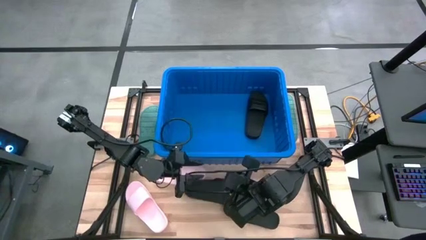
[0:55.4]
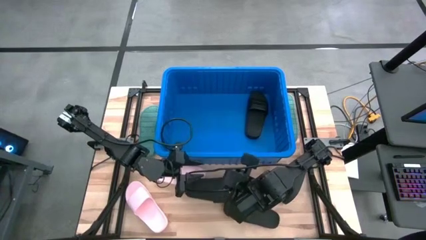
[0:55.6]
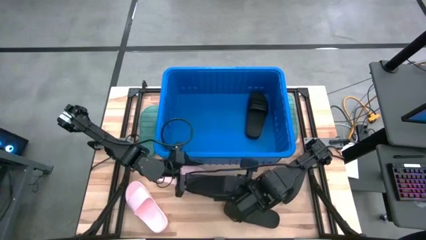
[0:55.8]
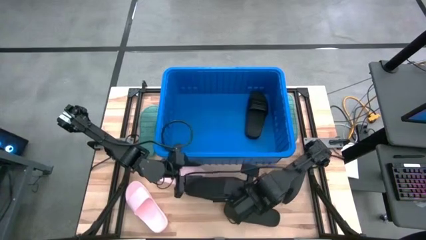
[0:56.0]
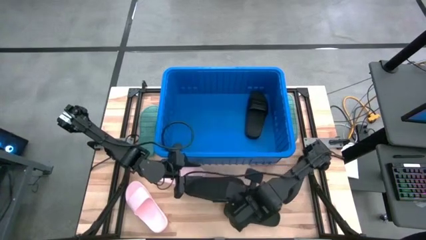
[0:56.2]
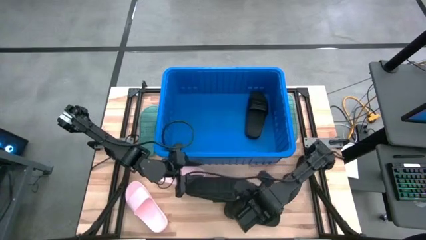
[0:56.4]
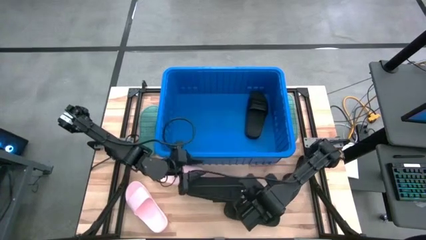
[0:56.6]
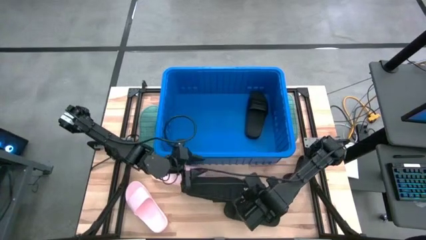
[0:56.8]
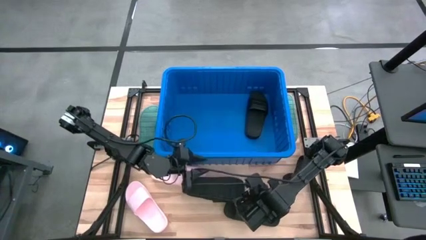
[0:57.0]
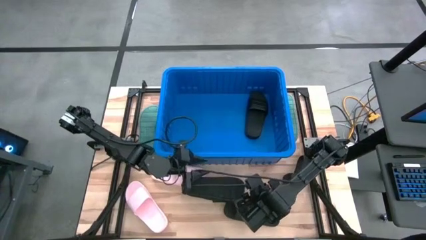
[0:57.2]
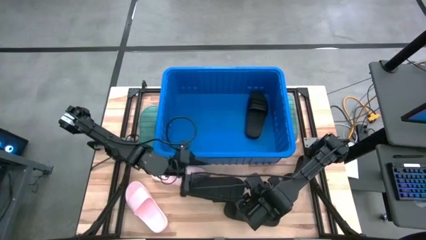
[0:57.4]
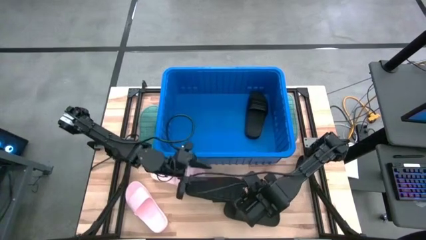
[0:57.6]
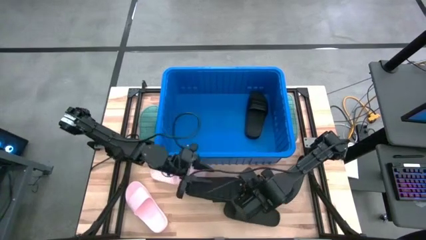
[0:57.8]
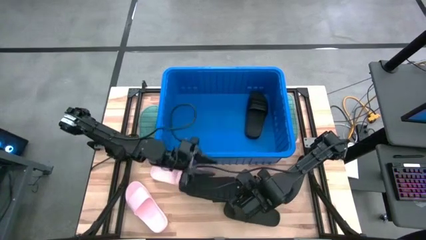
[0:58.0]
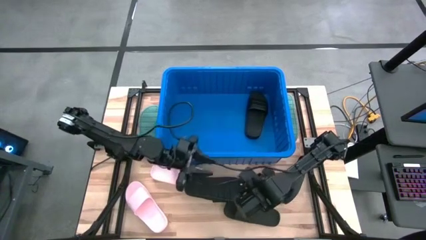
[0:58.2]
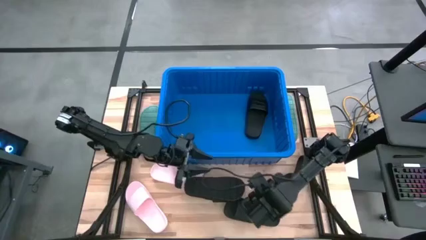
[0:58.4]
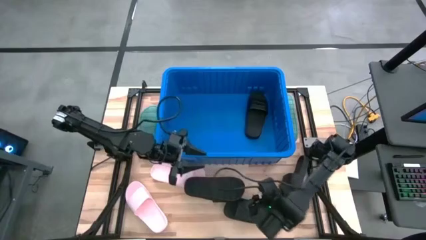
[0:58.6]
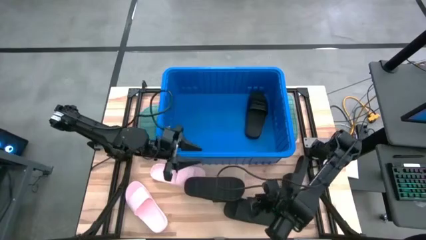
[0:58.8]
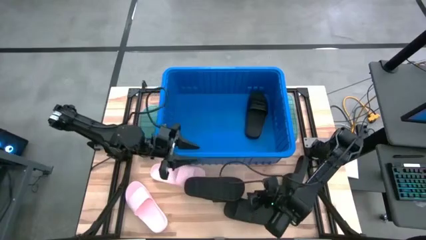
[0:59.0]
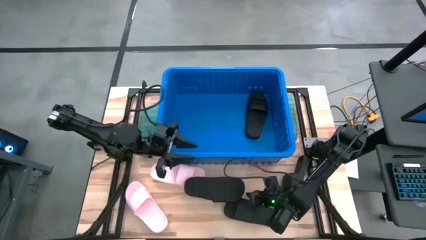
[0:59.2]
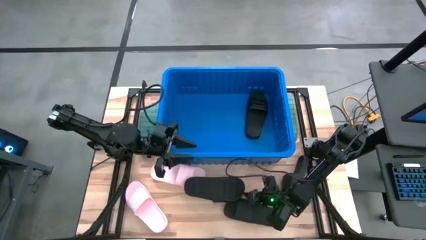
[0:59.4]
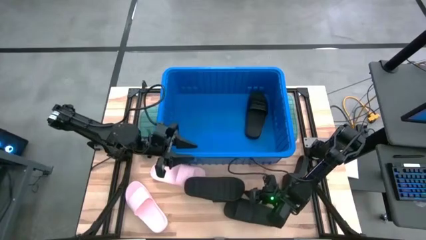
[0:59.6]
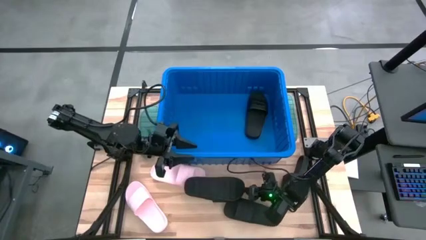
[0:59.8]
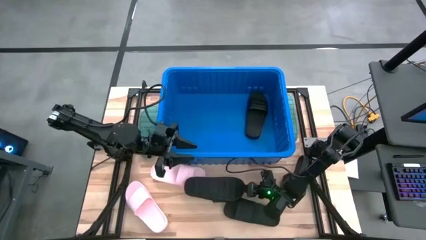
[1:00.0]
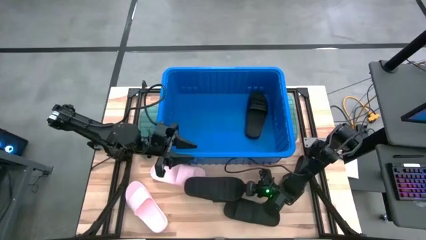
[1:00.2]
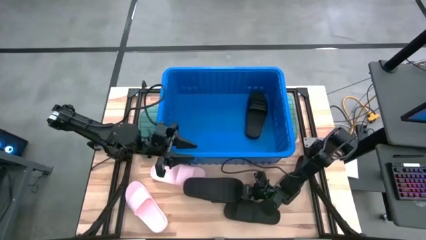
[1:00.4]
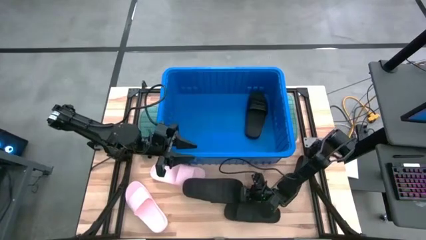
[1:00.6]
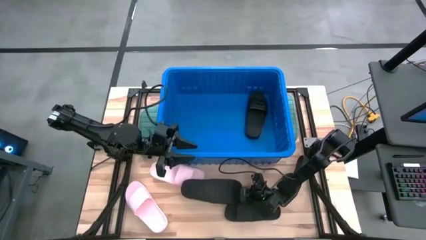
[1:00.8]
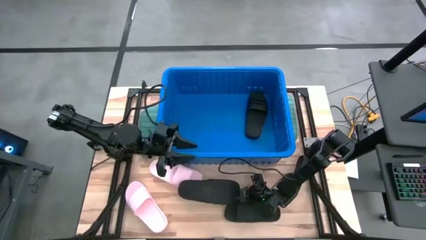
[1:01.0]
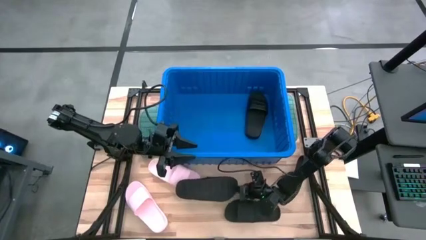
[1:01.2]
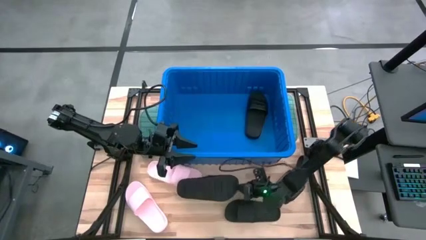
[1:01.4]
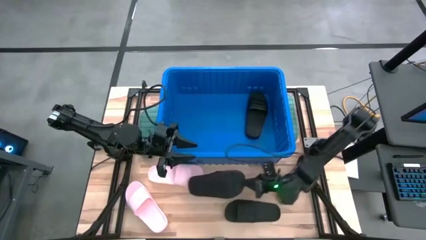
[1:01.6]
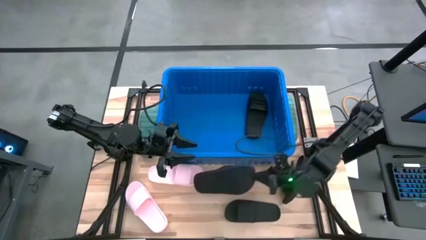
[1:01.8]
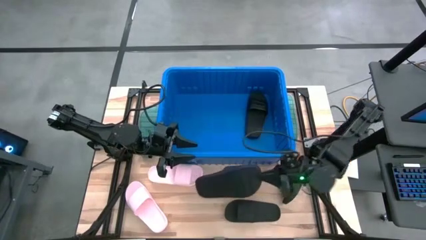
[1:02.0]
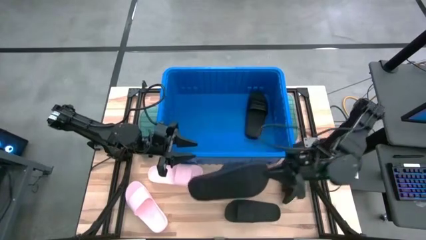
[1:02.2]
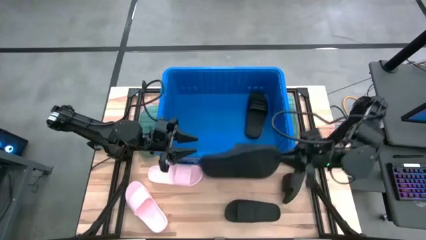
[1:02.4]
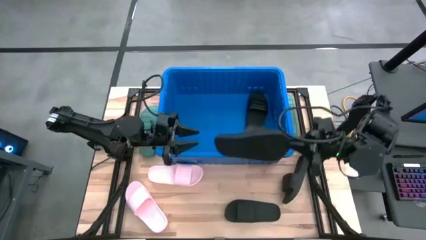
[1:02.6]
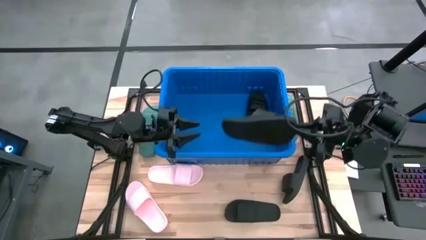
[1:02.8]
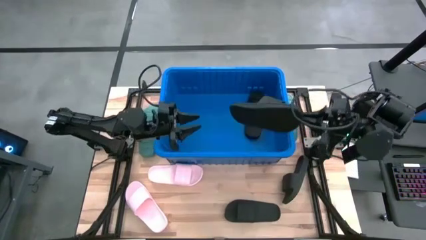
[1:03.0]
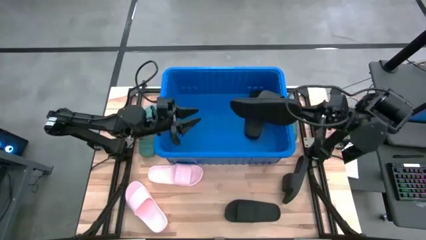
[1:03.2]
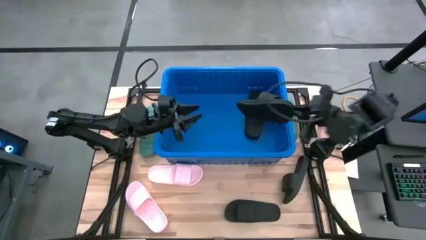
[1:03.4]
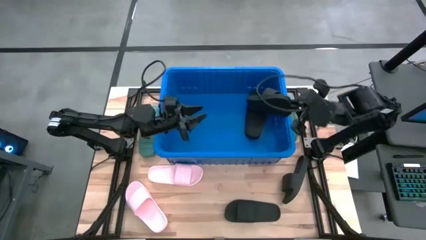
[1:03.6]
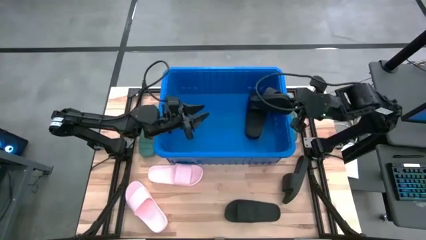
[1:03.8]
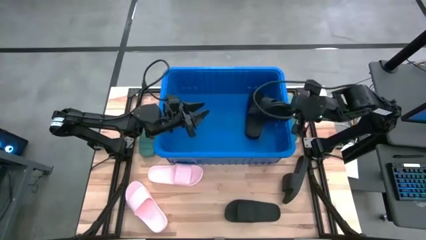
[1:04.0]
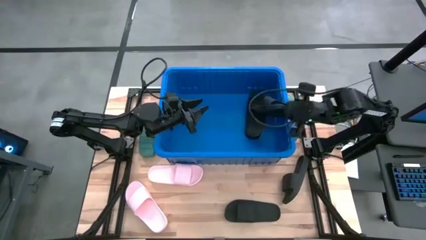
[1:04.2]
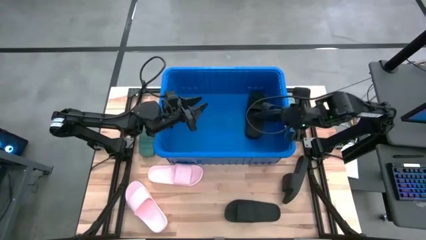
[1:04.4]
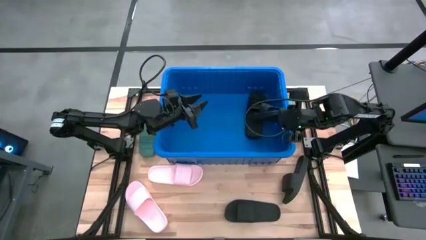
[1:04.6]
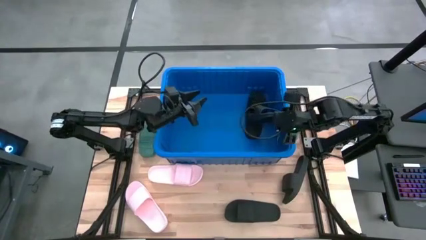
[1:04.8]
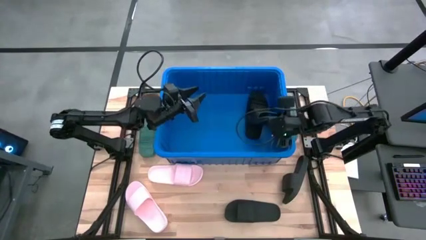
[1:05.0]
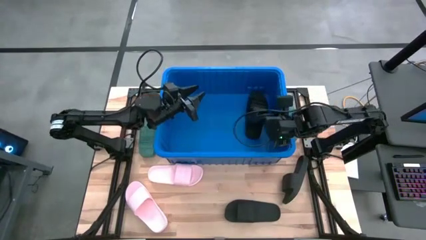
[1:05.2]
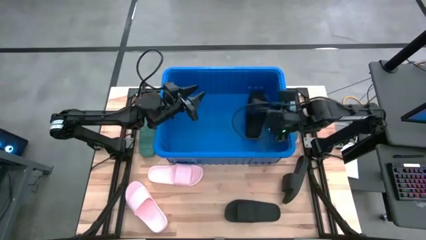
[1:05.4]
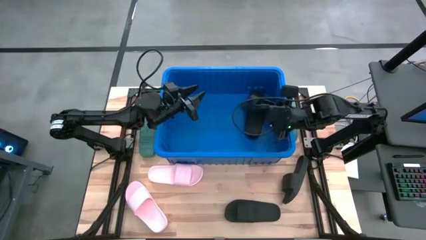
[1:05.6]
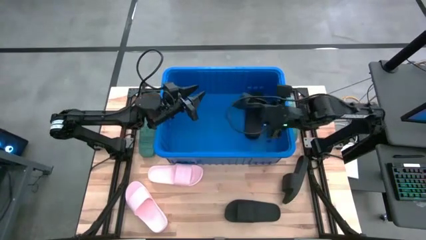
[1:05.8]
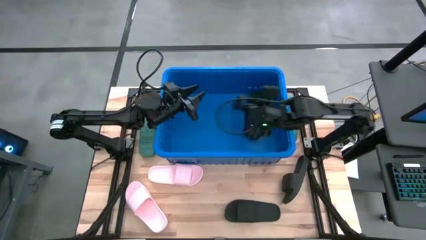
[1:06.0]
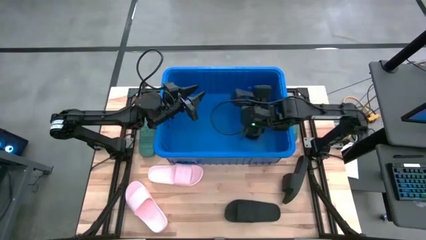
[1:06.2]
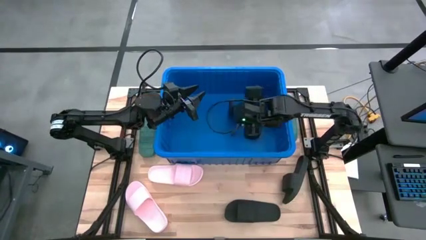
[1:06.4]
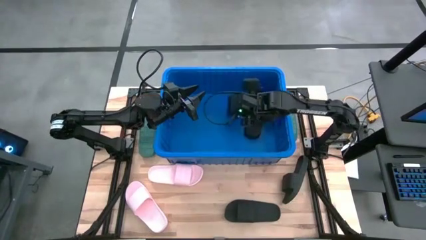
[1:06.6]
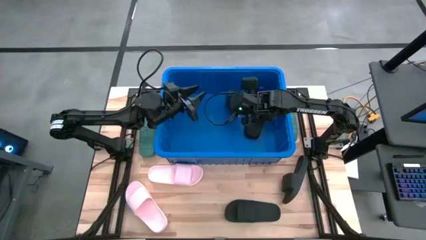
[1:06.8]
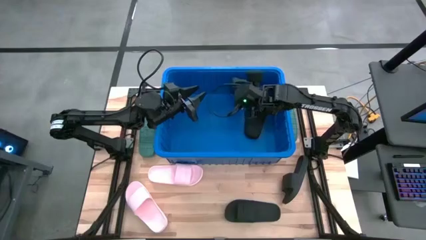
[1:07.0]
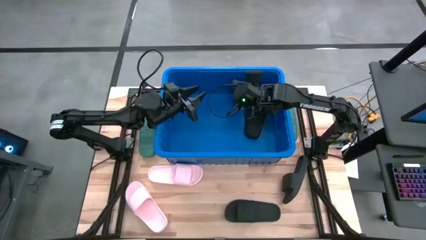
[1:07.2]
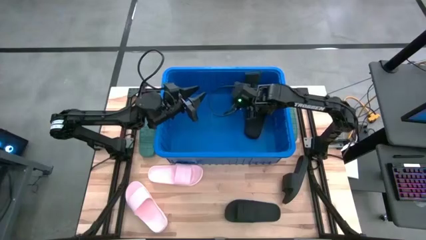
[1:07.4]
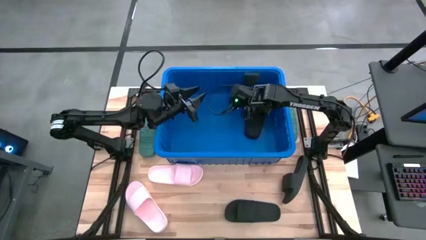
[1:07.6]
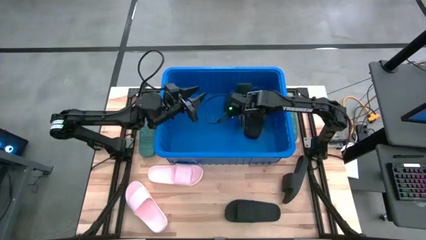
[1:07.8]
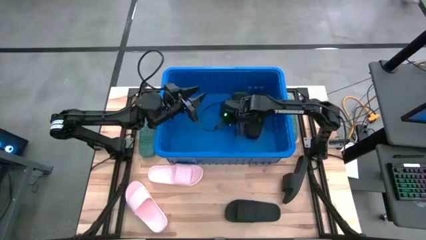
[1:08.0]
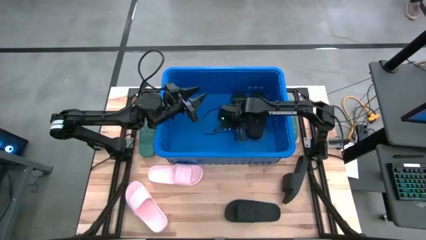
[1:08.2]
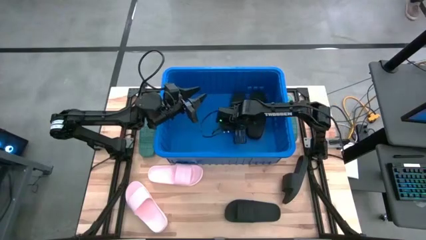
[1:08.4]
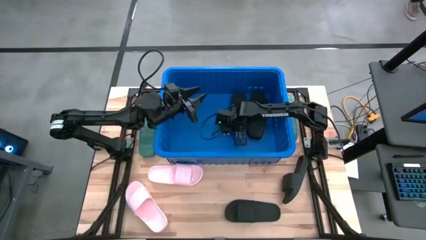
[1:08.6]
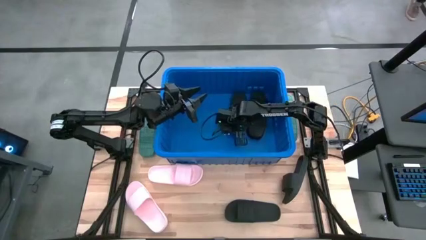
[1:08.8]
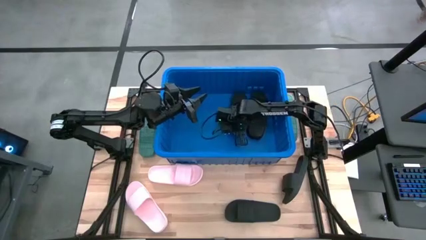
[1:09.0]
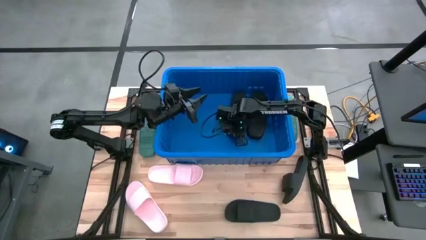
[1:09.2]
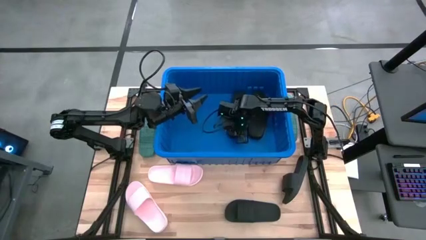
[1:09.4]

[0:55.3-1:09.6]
Task: Pick and place slides into bin
Put the black slipper into the blue bin
